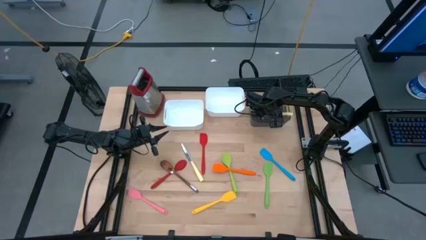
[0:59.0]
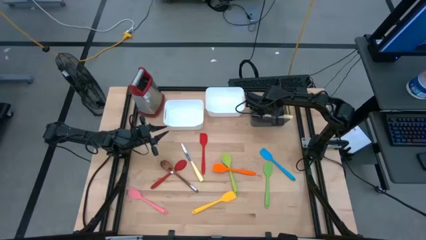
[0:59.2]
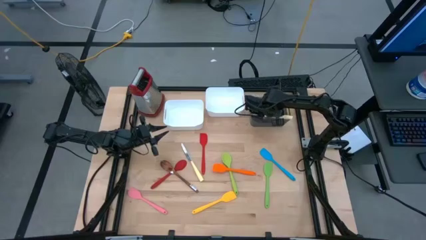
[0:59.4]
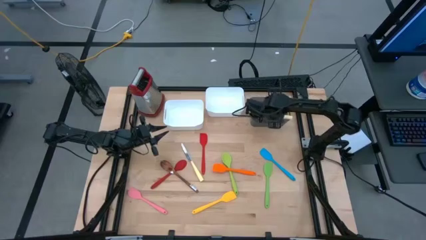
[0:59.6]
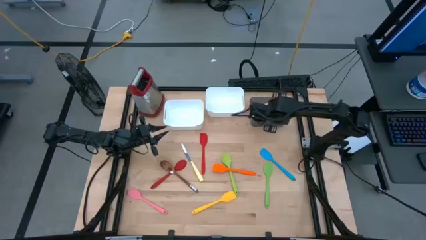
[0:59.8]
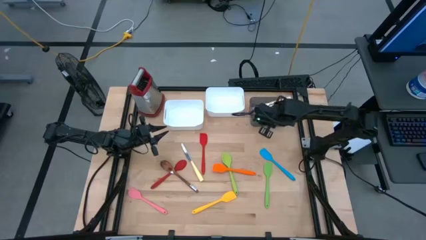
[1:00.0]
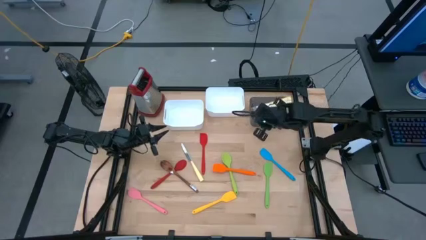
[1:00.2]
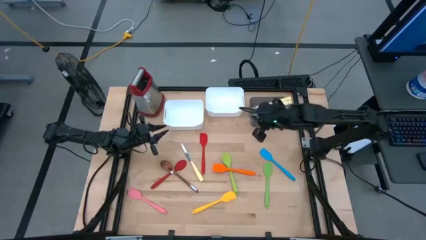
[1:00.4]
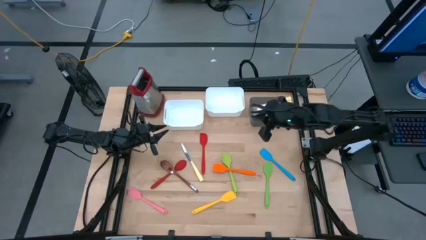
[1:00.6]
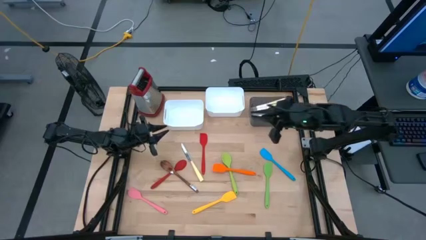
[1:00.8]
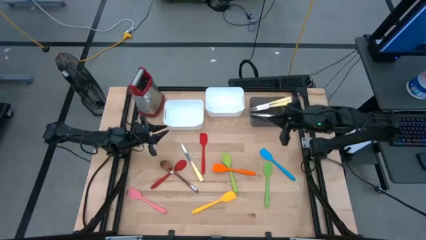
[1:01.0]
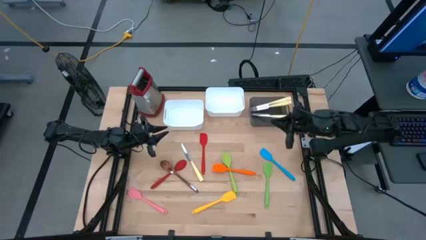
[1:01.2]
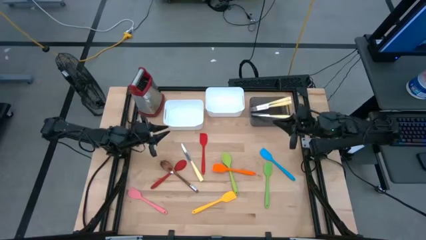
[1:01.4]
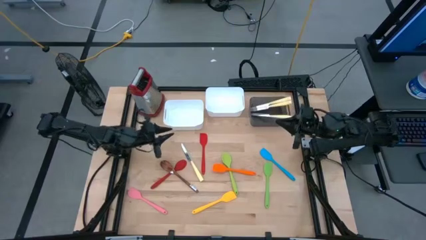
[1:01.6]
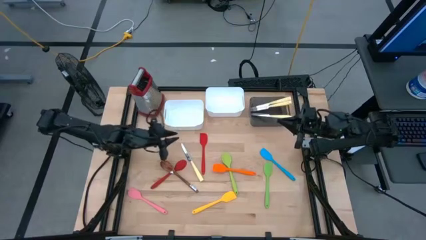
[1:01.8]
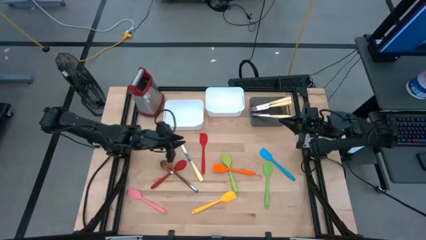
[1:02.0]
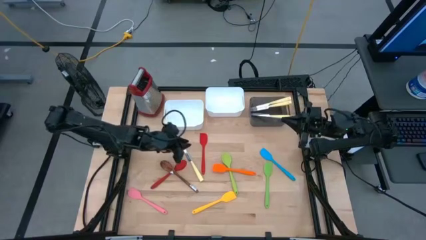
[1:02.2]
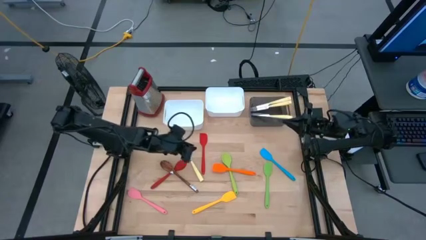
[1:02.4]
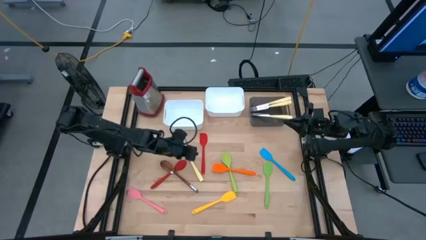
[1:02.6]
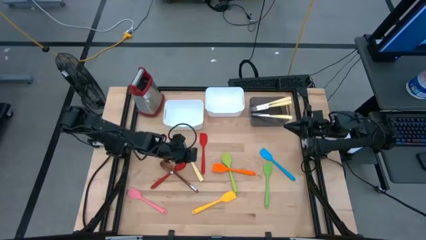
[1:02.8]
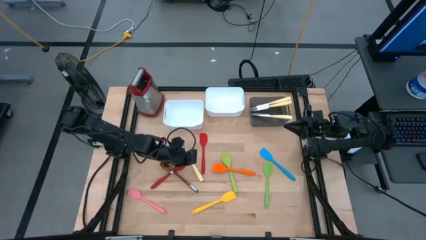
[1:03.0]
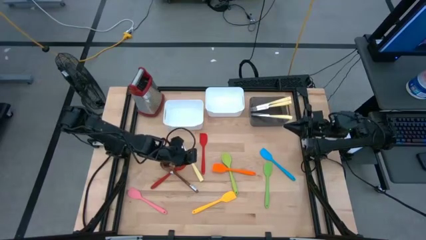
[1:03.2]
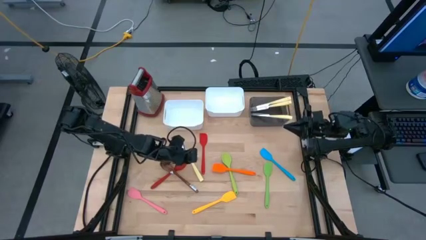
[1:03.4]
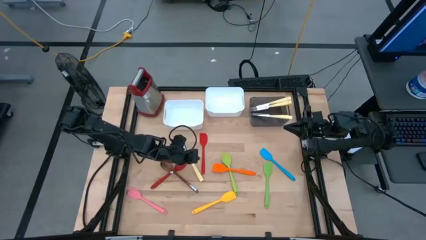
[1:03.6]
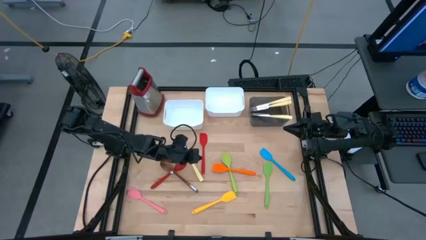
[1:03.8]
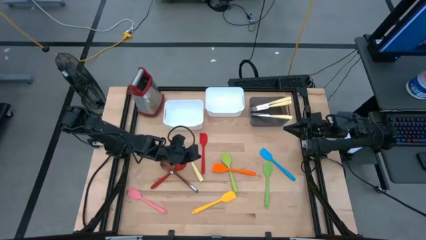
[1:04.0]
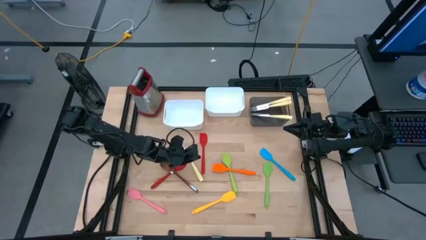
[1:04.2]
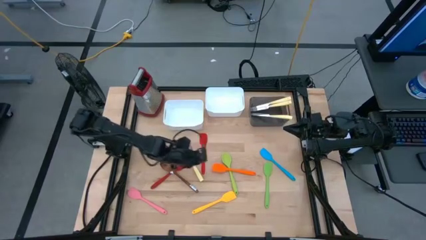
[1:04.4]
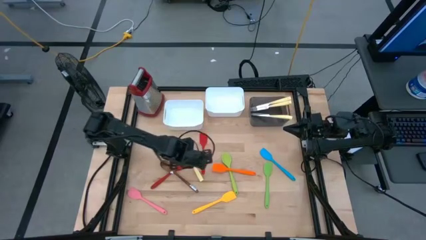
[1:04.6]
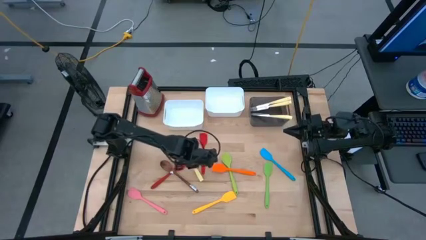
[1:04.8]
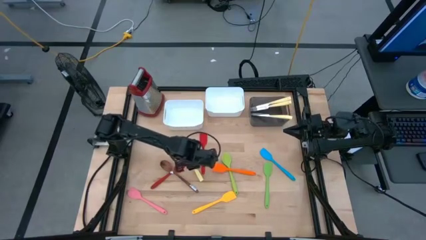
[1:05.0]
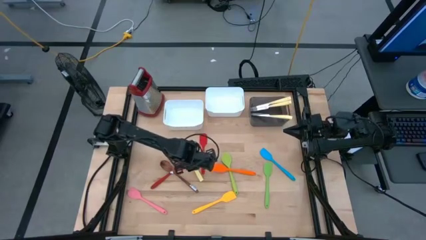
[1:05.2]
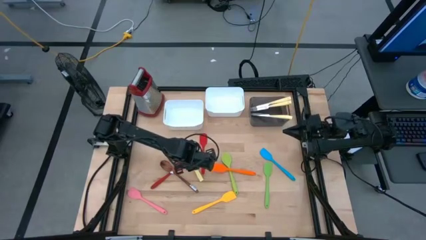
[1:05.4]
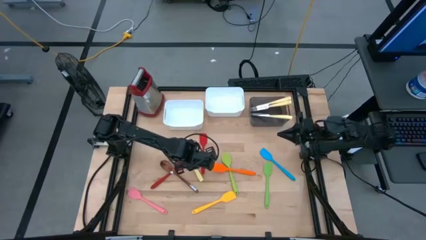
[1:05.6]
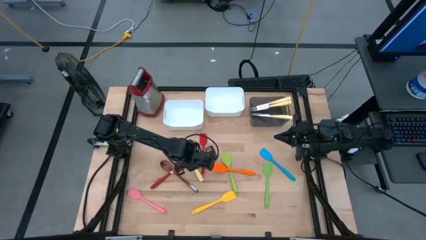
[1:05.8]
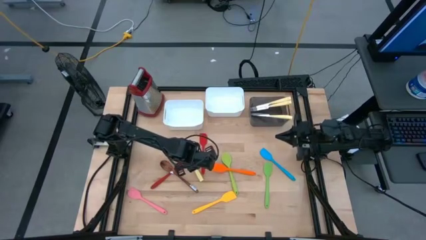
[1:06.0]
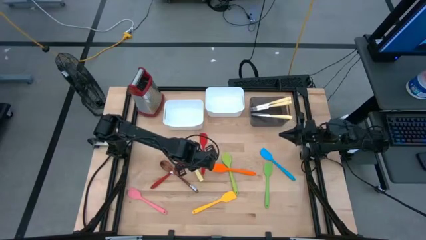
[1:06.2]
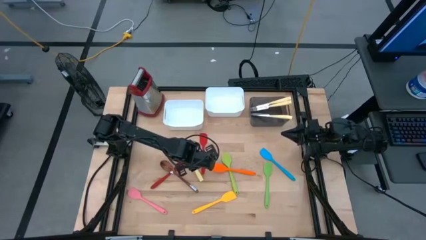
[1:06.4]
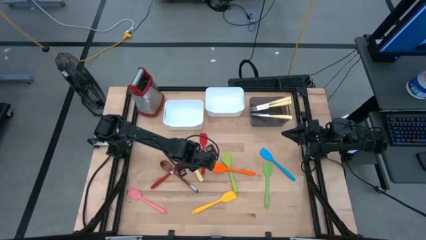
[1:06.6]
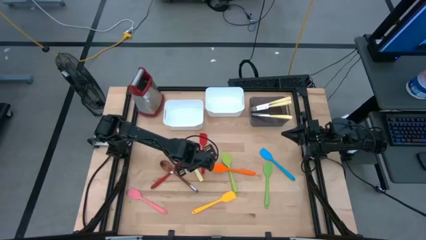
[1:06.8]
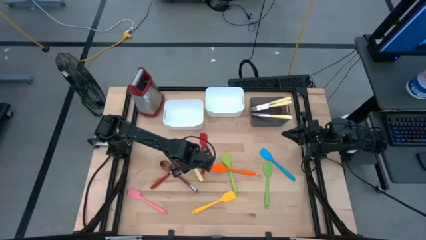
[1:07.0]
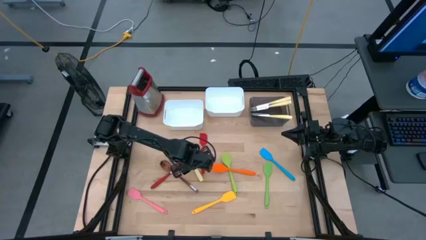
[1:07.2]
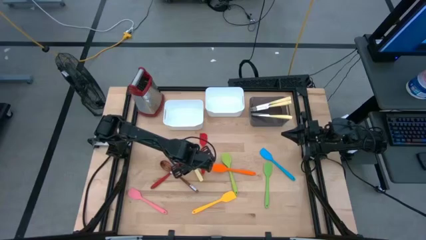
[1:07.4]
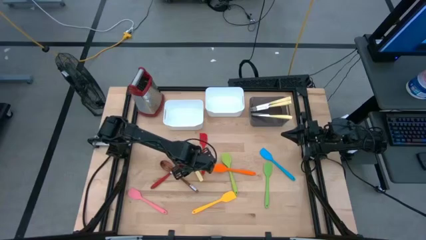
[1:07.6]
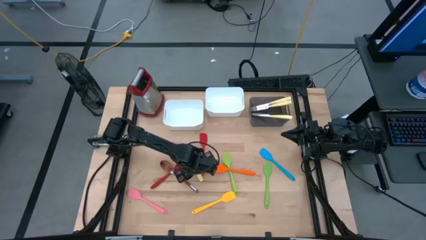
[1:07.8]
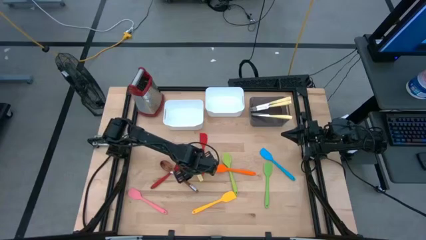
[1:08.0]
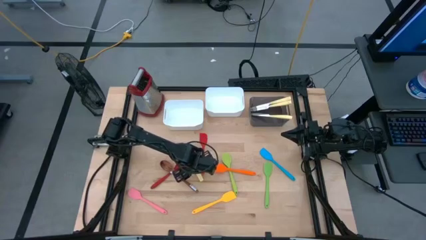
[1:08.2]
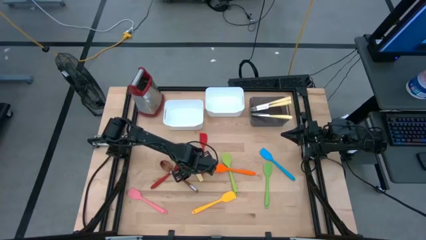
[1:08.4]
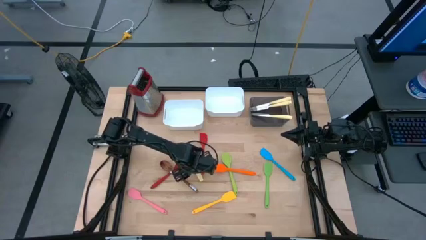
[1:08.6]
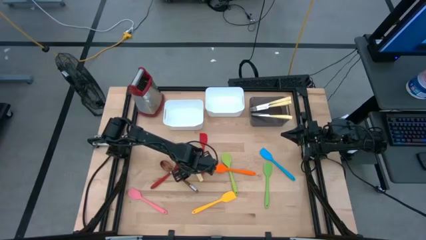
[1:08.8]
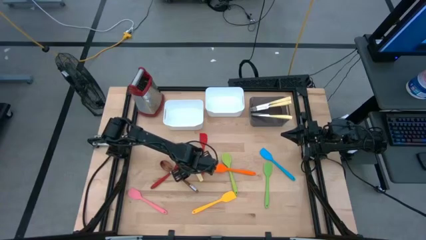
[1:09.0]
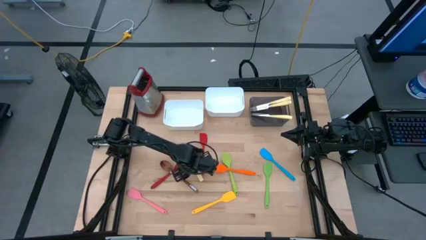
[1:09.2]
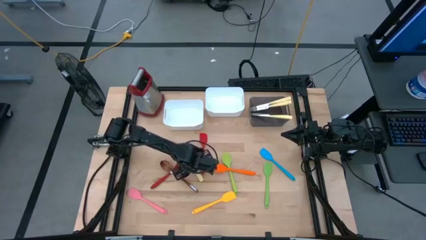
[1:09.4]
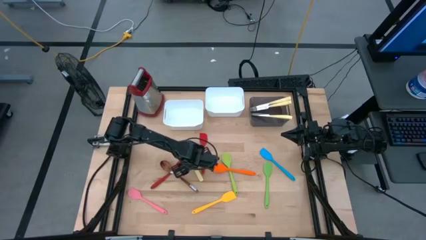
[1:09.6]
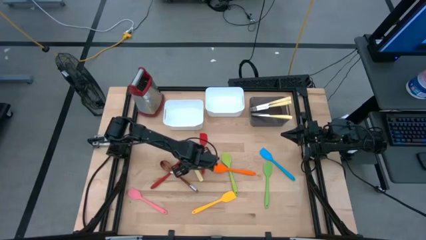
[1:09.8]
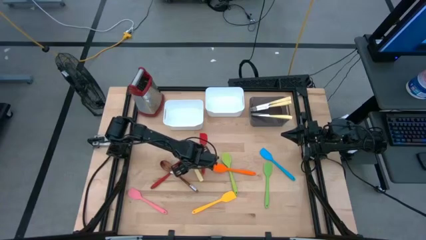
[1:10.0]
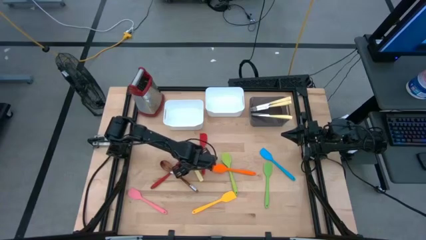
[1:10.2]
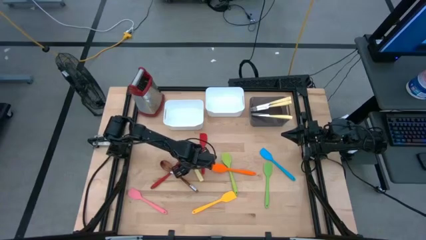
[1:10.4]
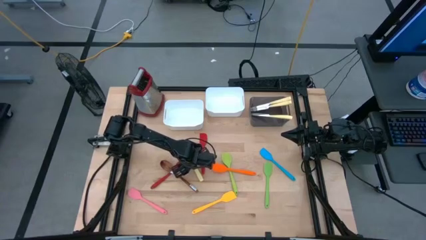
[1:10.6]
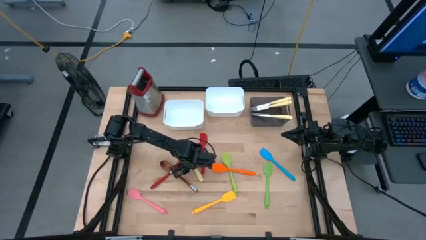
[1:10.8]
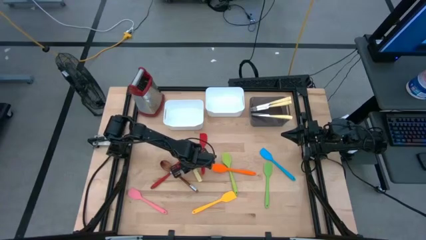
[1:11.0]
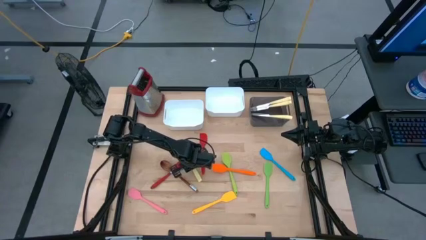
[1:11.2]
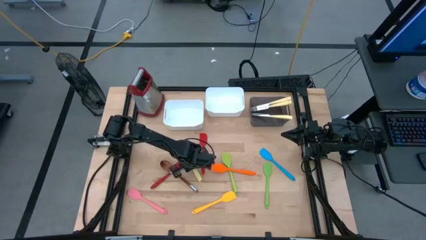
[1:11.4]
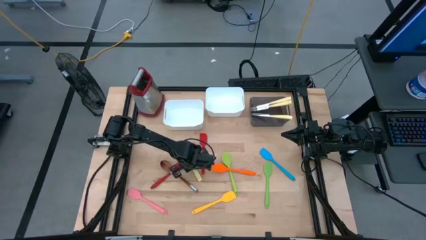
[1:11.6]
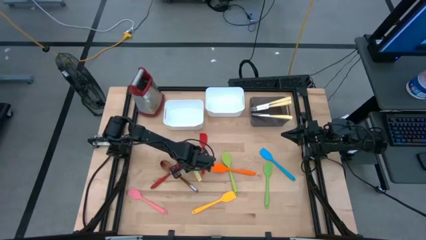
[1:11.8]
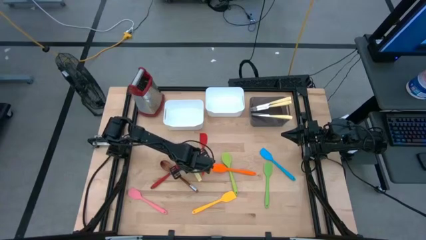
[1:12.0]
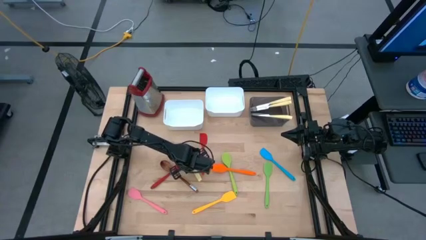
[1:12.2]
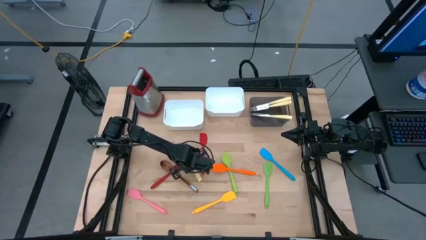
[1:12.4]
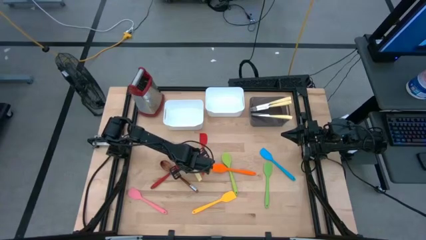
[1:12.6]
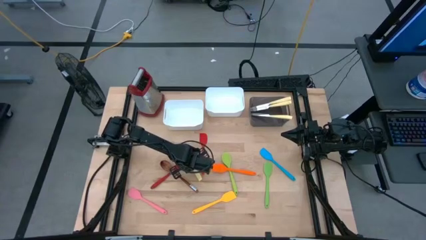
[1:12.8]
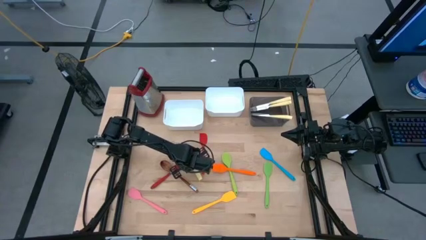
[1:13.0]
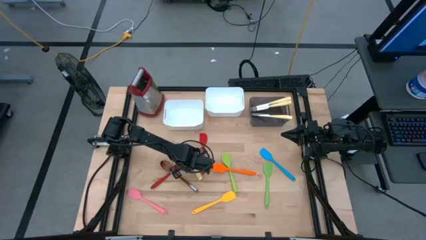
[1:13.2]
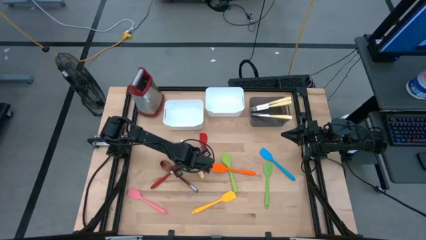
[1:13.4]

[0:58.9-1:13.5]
Task: Pick & Place Kitchen Items
Put the yellow knife into the black bin
